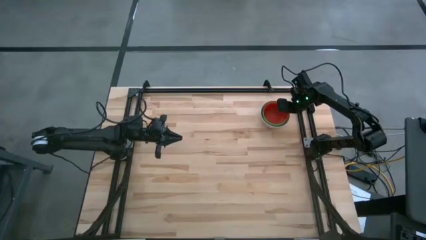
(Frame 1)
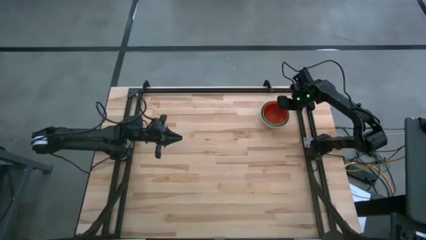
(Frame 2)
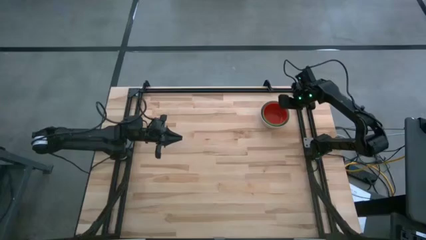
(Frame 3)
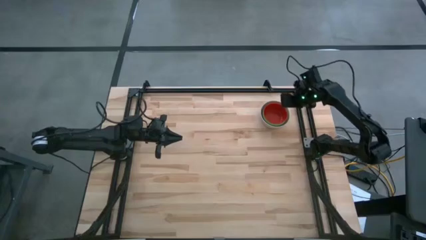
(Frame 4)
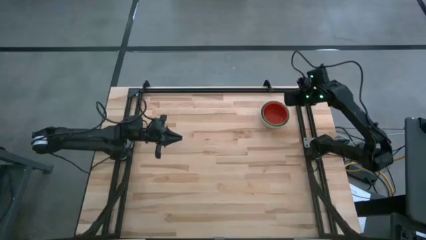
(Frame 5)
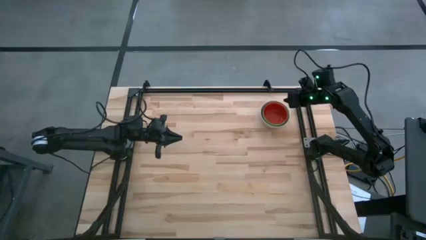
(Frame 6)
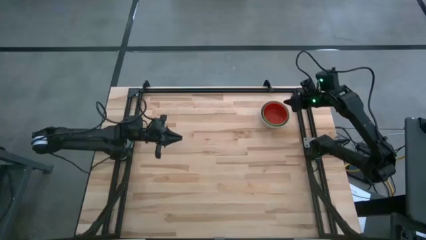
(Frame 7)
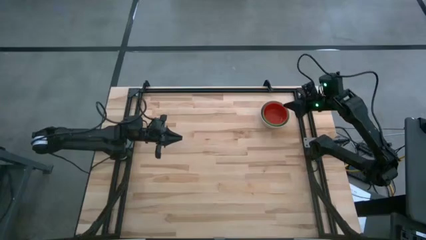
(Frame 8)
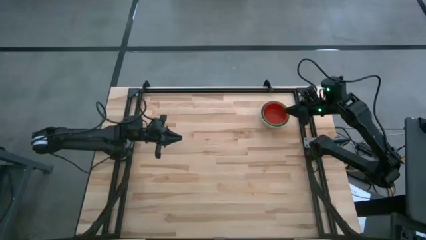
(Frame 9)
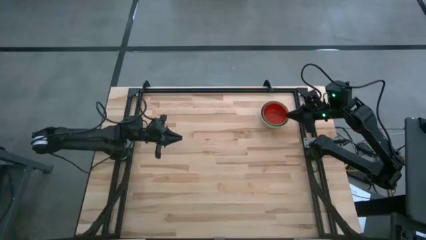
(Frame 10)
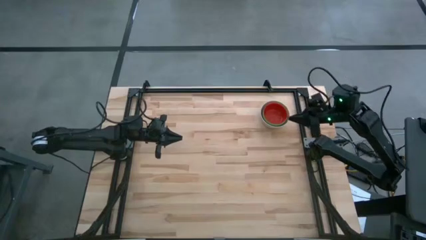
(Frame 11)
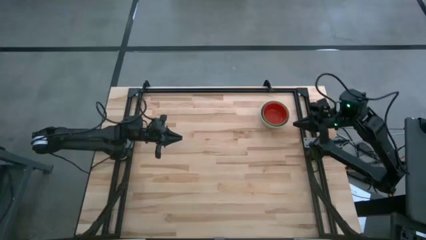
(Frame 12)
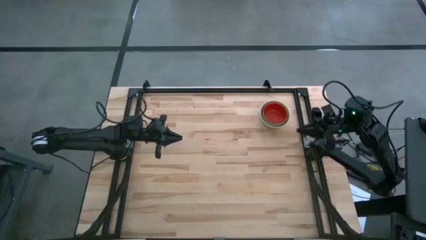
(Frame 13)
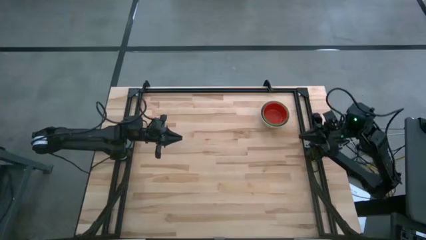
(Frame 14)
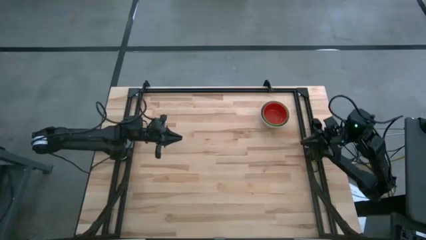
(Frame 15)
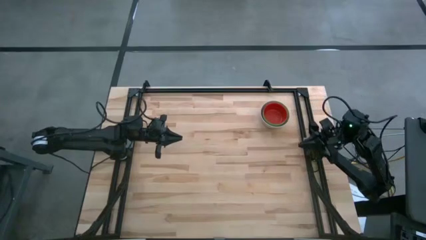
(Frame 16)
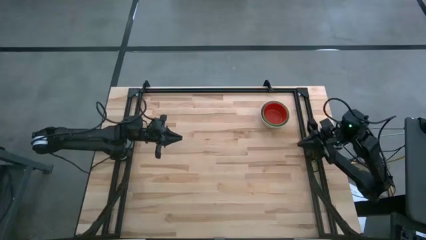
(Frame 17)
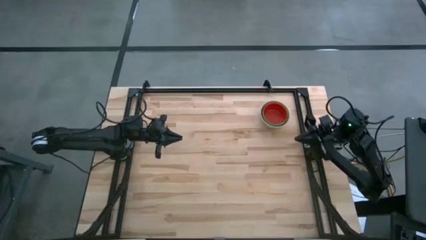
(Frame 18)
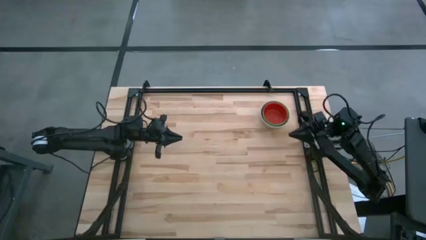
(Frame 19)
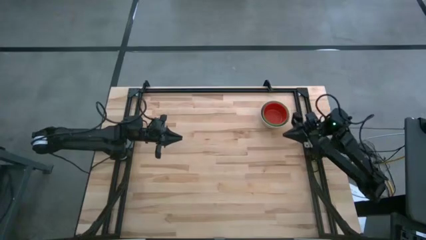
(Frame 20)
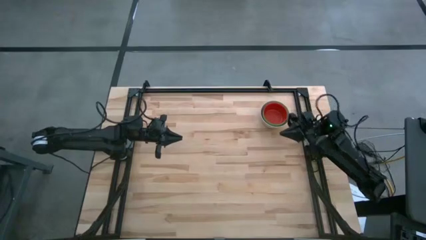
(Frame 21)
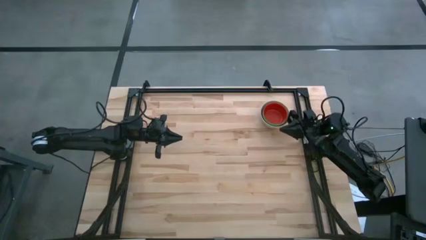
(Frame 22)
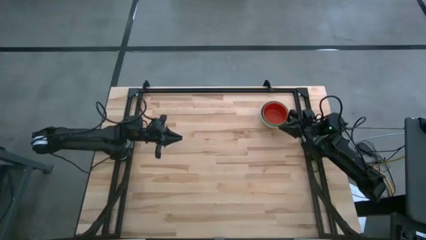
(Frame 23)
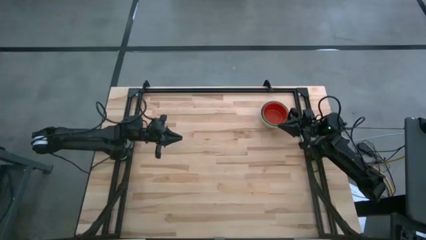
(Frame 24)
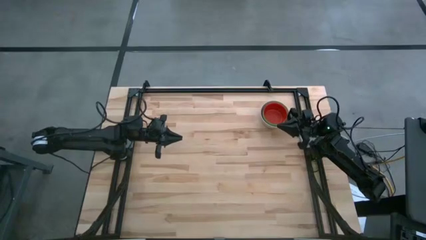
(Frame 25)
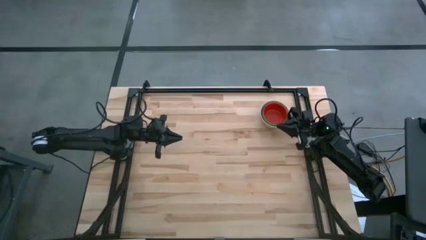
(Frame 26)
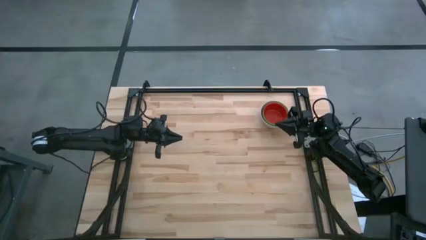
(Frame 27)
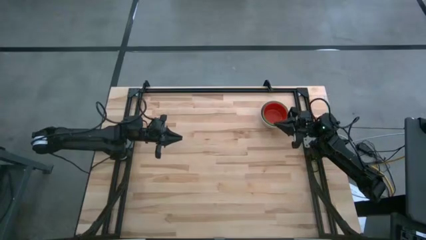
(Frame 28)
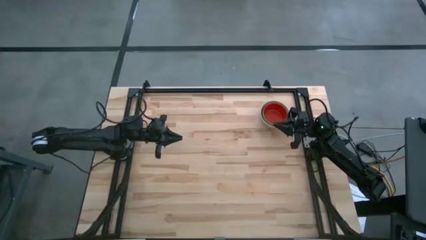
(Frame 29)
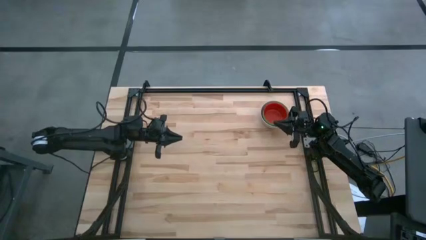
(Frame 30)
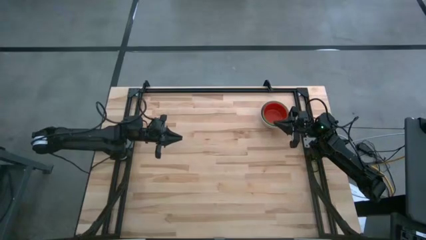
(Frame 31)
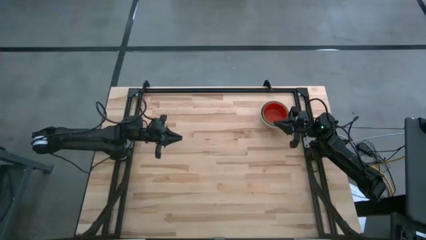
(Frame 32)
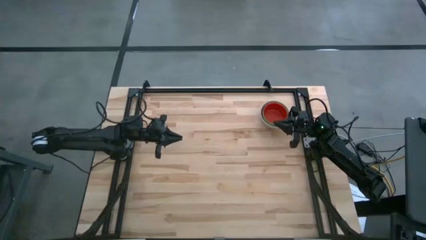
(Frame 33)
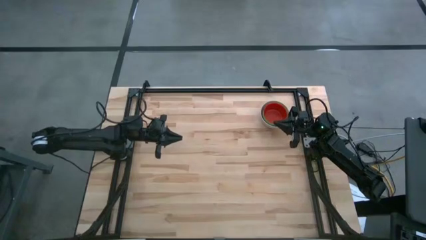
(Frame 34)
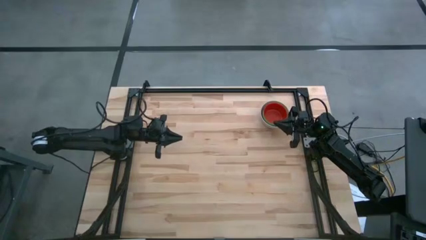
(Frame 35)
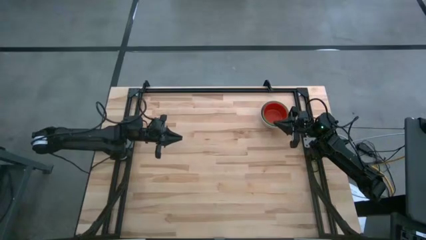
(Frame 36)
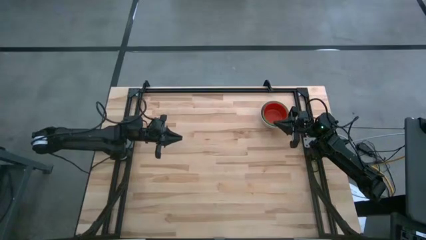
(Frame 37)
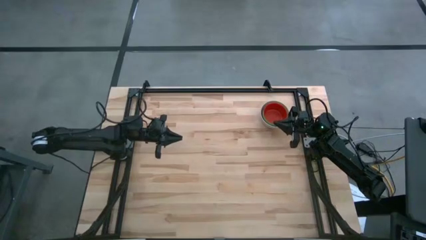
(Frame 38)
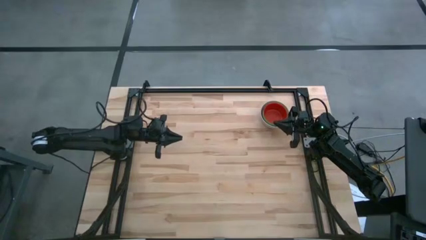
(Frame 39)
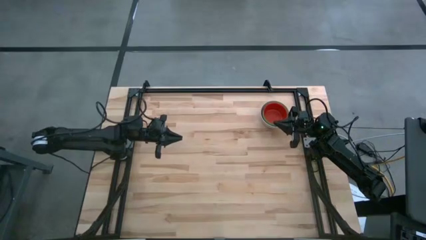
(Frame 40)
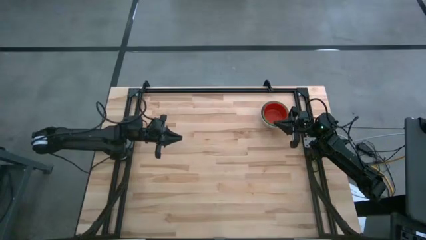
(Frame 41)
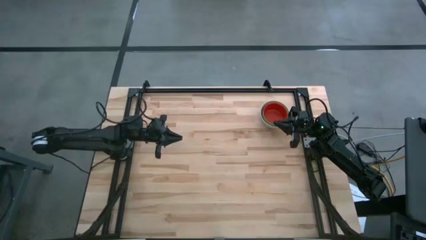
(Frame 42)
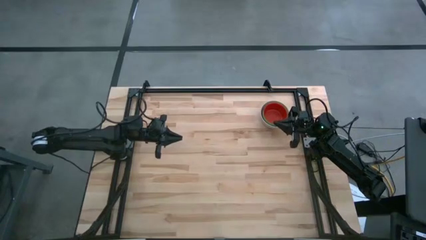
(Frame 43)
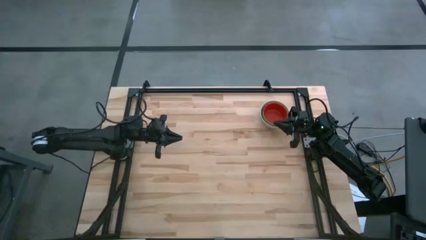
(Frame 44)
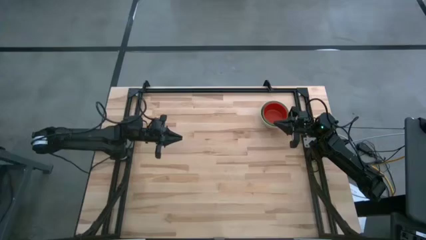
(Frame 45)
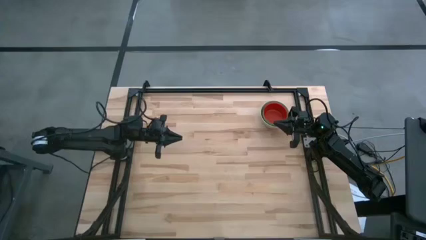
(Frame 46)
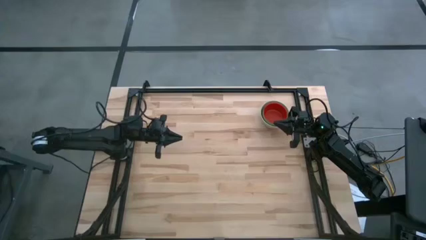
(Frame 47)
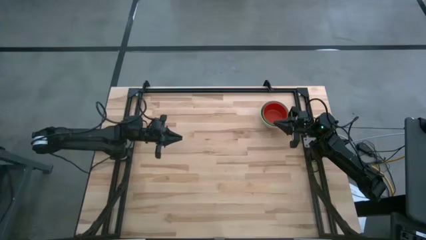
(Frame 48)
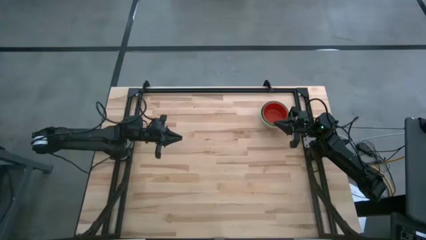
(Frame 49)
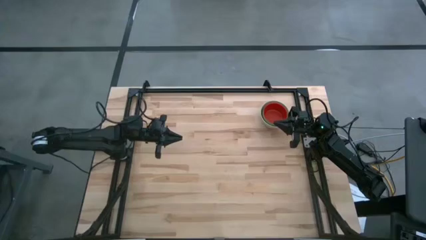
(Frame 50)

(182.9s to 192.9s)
Return to Home Position

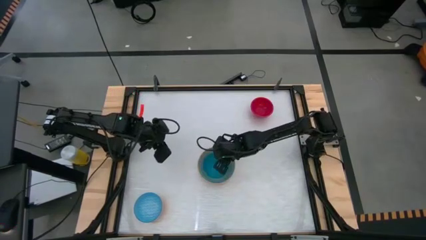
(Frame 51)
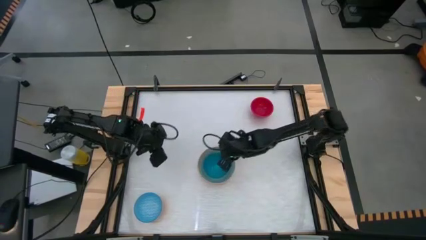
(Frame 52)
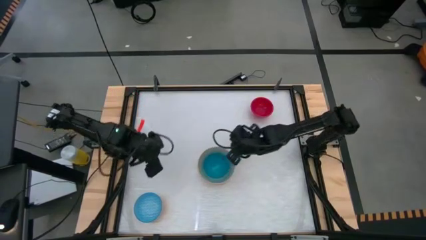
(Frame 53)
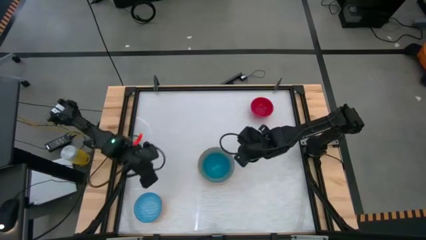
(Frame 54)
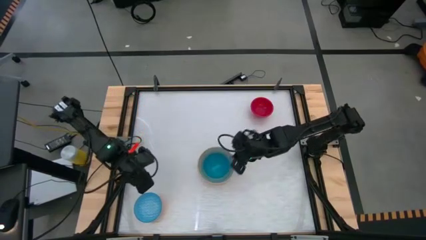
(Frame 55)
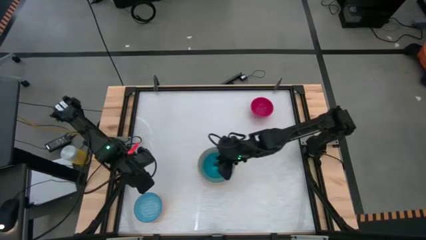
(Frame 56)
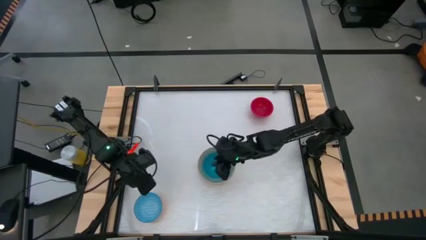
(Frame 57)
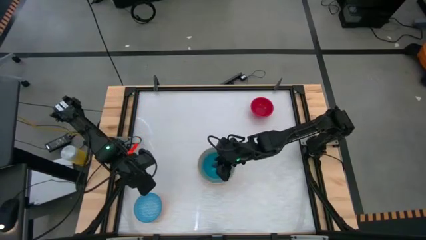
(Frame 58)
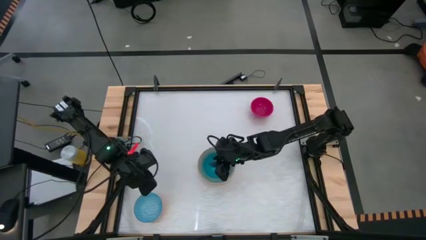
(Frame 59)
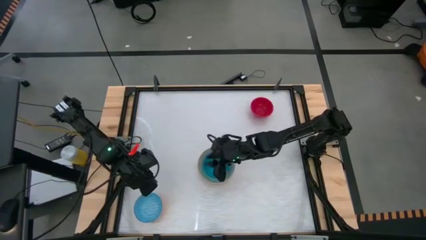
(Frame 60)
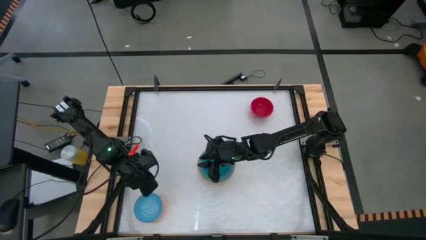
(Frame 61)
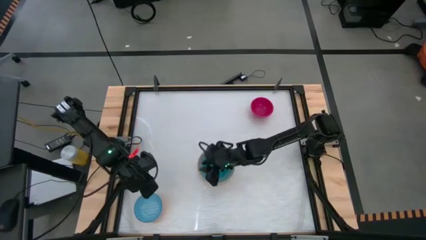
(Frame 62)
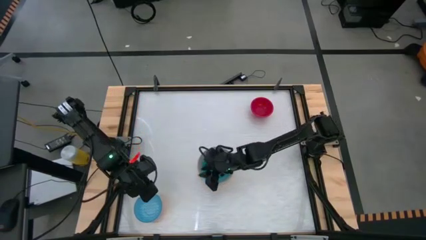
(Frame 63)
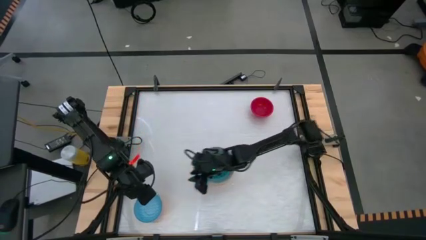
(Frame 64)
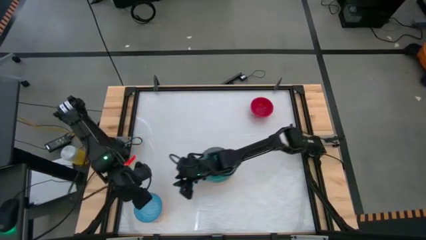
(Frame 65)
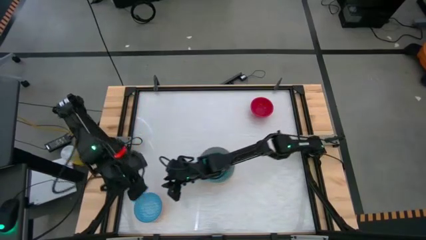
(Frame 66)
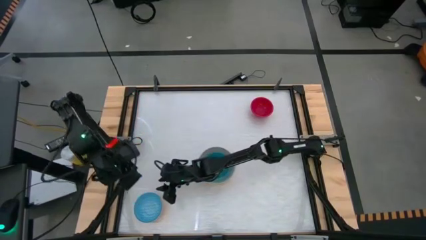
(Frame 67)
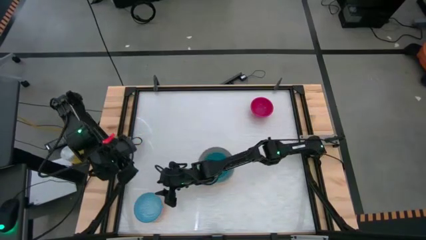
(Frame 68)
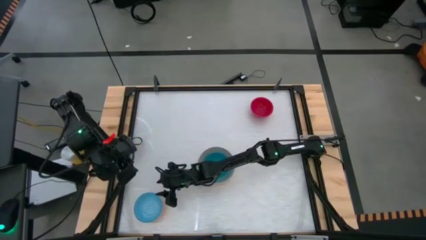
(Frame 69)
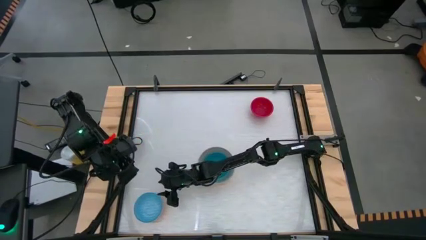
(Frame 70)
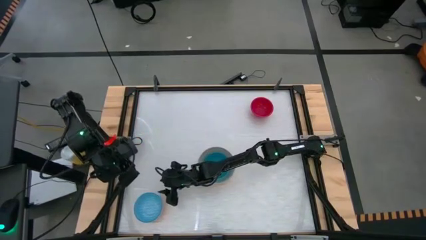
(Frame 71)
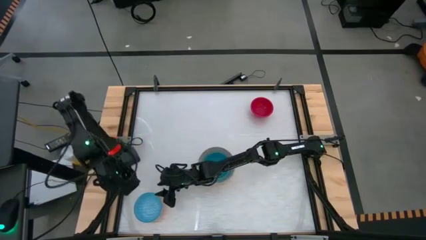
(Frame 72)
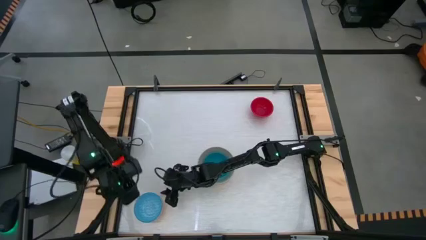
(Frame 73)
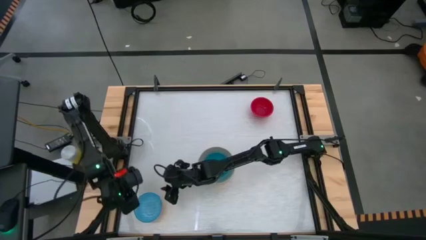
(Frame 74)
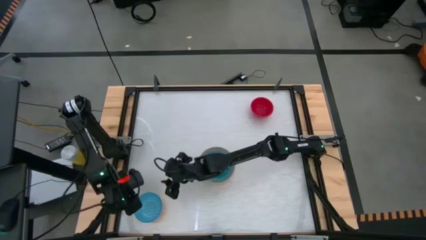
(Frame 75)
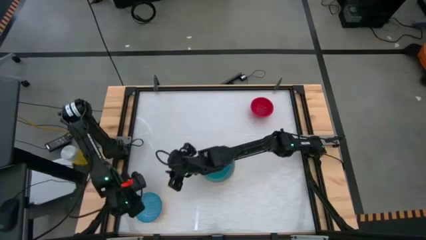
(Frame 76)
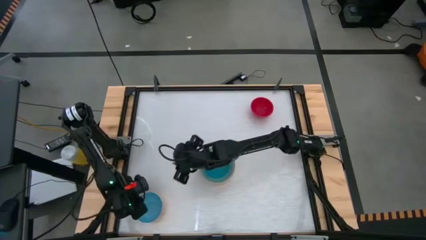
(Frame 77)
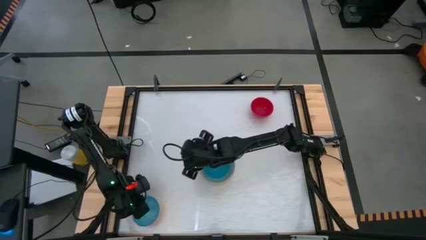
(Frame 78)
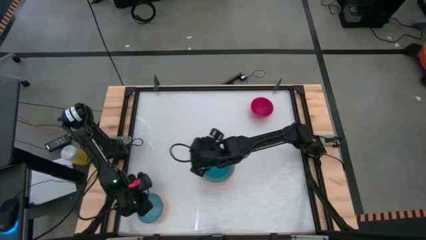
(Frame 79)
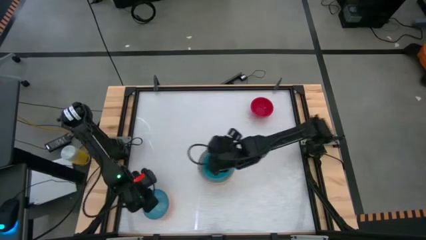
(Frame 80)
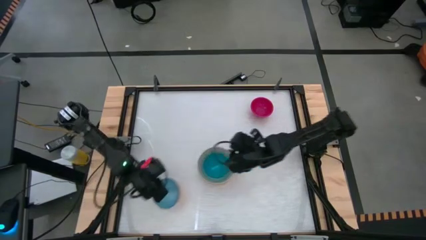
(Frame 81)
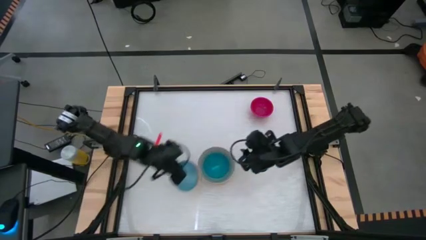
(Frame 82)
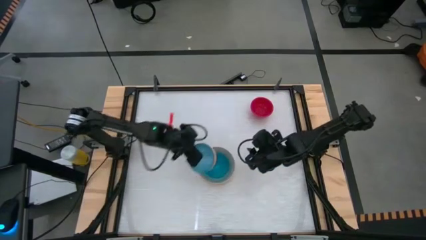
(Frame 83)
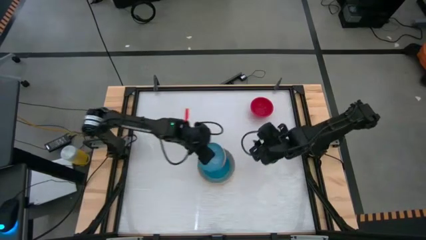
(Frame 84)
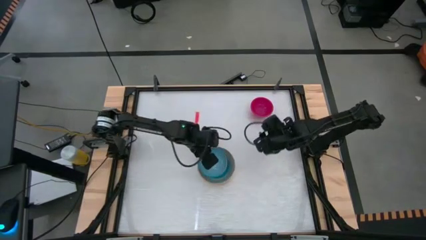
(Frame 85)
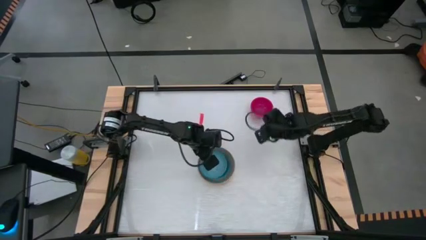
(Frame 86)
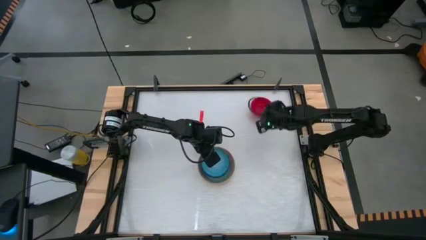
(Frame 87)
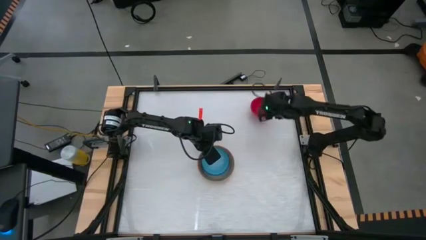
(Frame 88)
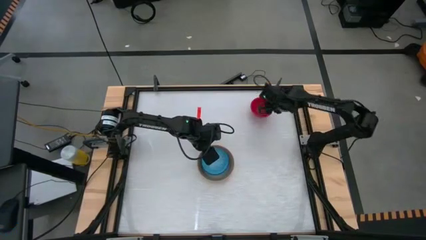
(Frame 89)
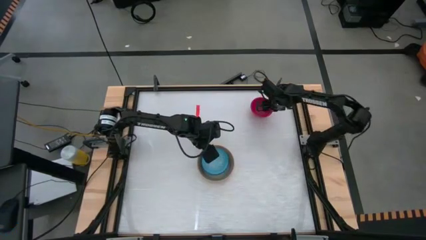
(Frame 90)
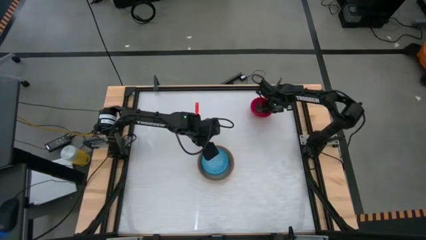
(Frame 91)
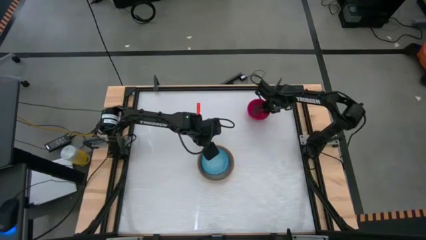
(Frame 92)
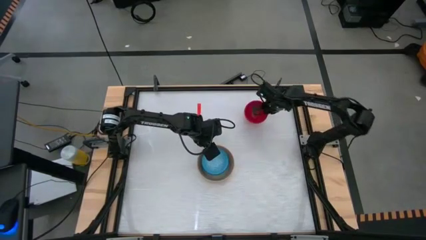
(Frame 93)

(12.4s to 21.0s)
Stack the light blue bowl on top of the blue bowl
